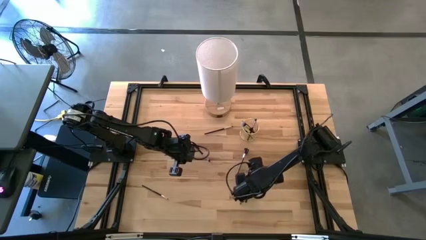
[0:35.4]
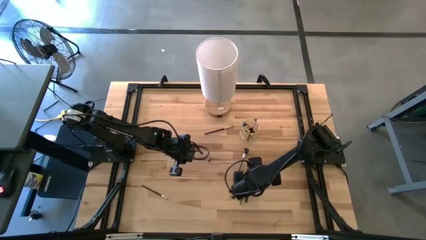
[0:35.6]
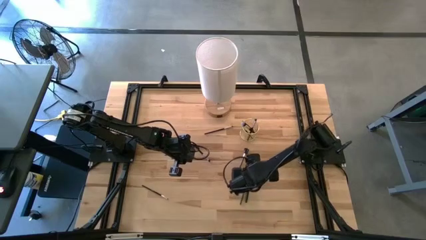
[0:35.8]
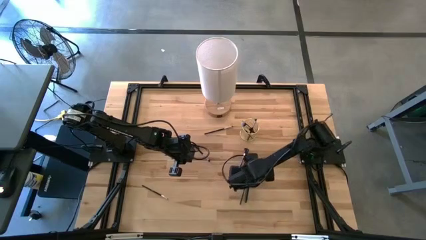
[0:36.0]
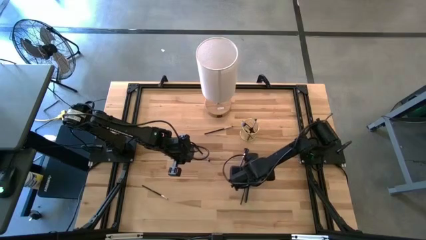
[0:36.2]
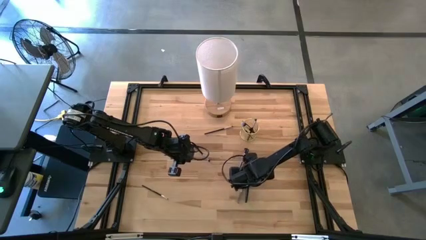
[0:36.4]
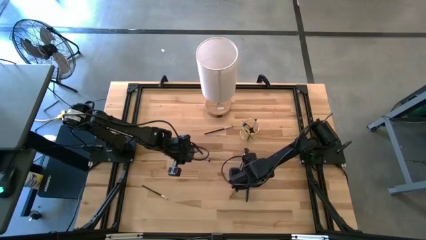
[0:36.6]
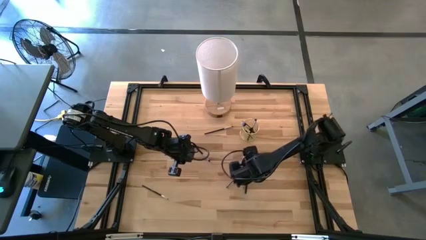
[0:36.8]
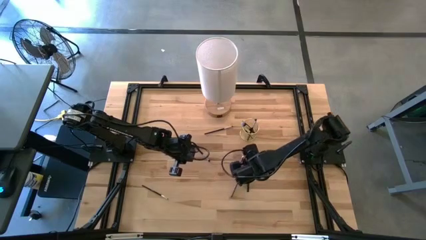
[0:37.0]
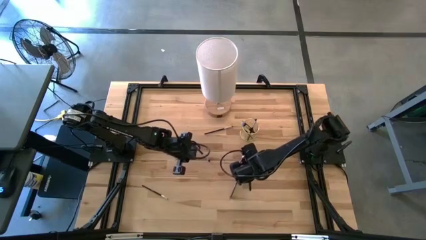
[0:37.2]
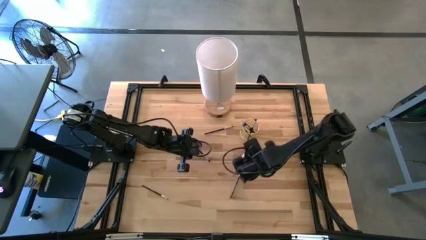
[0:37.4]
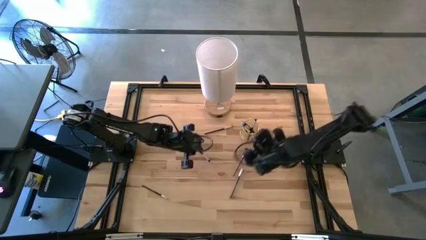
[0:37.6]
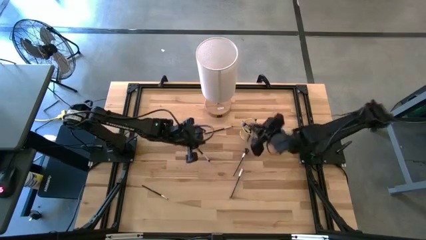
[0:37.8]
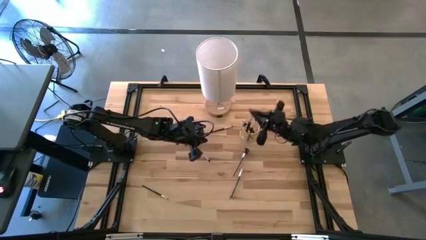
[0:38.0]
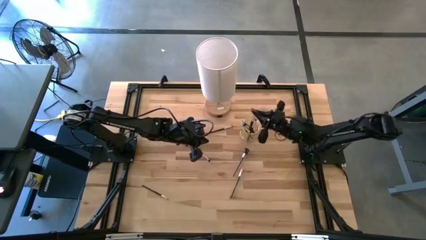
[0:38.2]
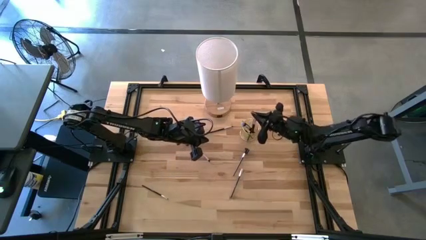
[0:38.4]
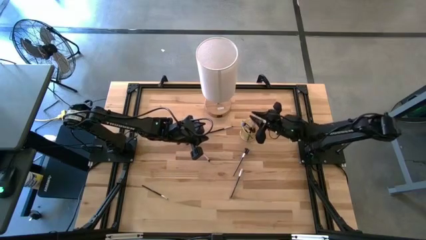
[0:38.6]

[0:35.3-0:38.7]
Task: Pick & Place Makeup Brushes
Put the black powder brush into the makeup brush holder

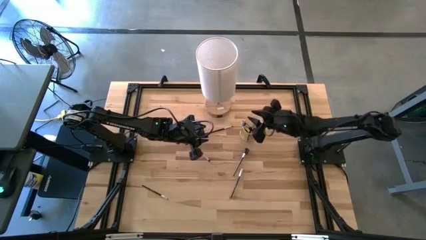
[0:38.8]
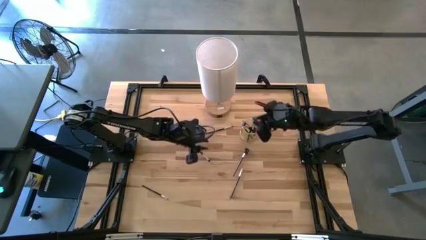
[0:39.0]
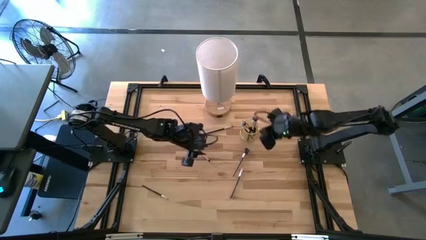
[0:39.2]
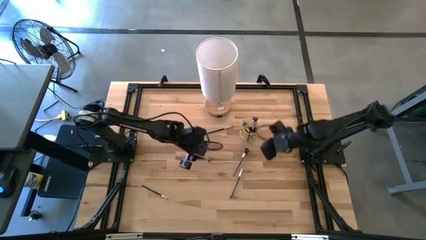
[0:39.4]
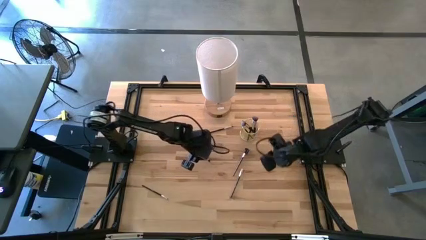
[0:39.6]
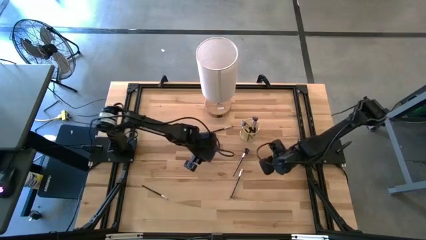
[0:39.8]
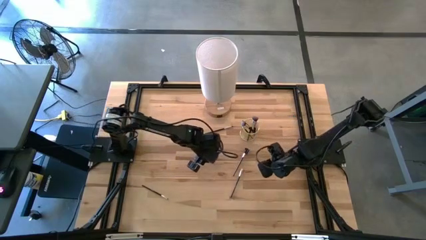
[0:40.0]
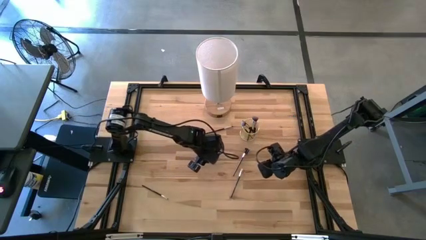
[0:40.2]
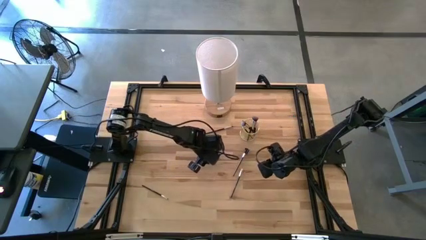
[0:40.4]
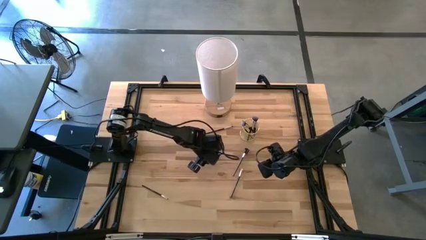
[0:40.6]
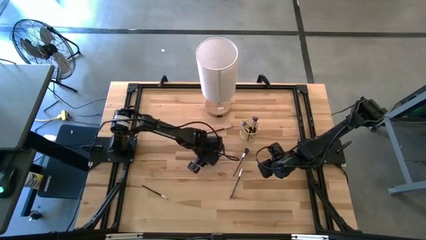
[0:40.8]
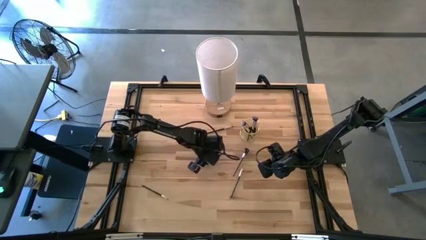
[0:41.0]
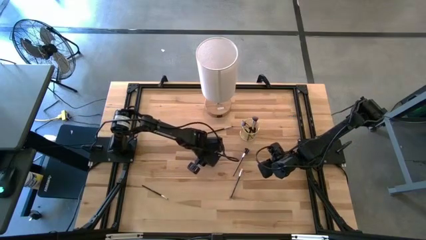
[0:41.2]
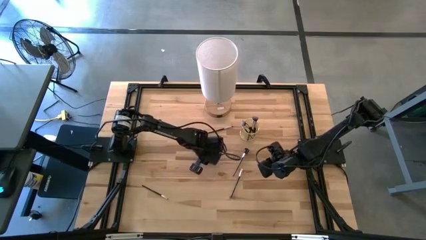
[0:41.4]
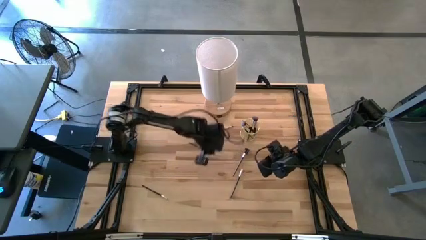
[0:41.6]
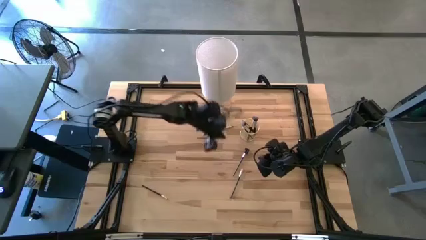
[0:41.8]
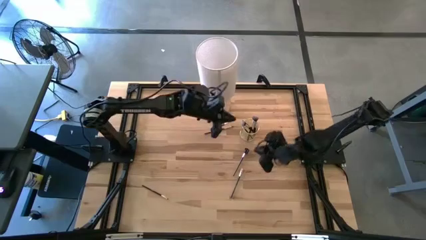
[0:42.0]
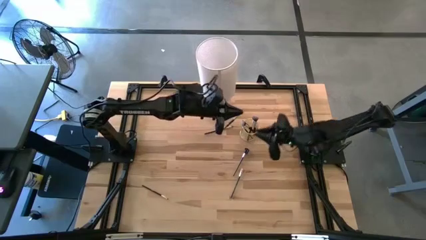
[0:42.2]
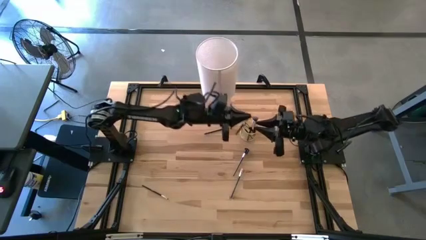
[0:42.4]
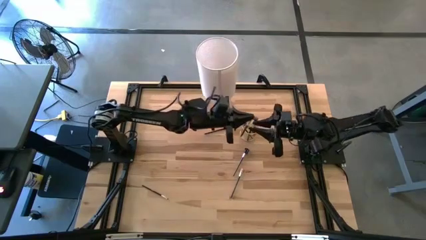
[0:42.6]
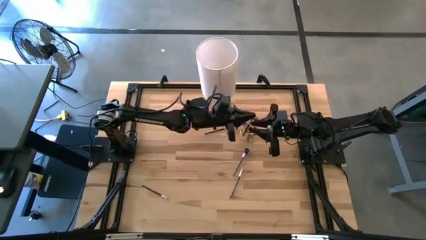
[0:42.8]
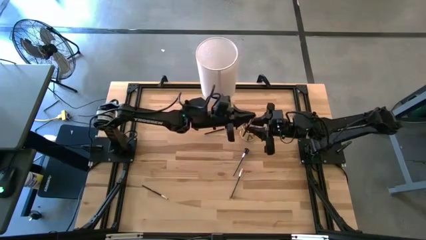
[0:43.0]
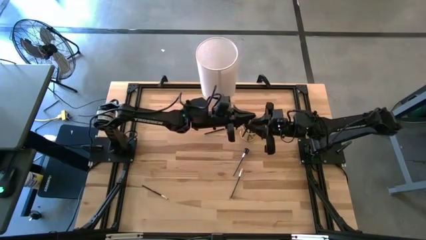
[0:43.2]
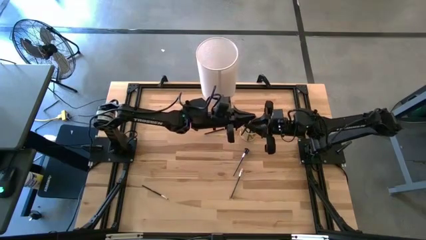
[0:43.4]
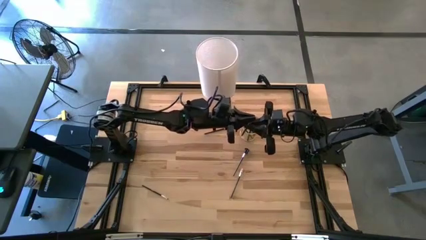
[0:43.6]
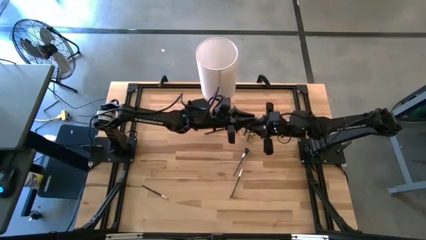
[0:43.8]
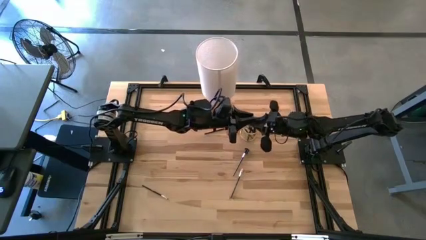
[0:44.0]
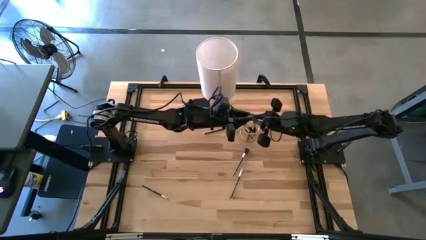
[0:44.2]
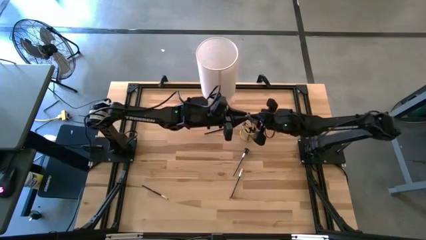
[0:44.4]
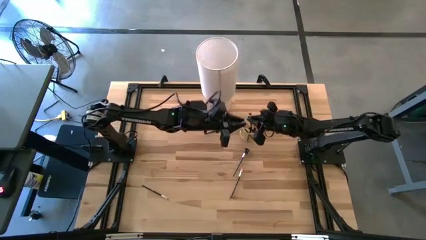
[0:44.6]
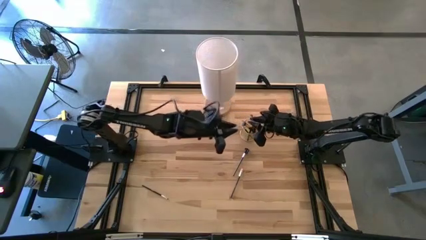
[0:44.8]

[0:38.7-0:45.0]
Put the black foundation brush into the makeup brush holder

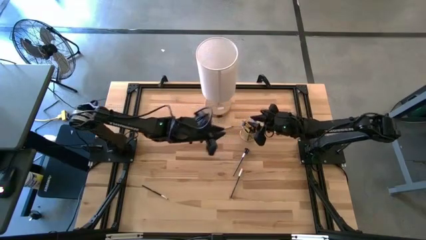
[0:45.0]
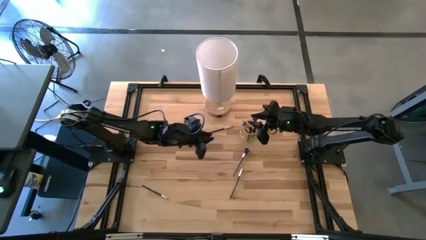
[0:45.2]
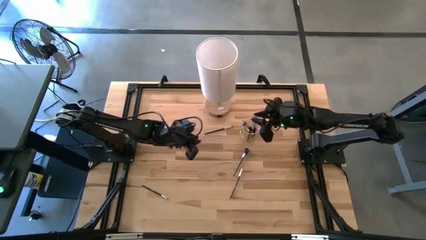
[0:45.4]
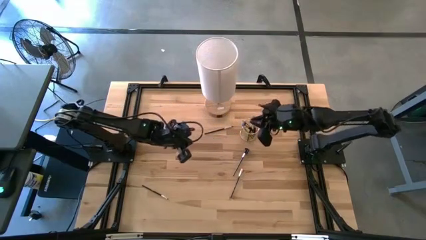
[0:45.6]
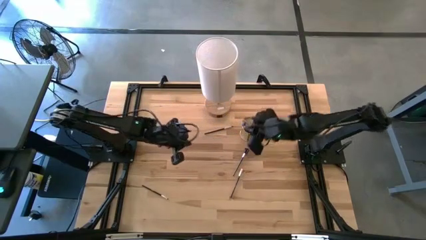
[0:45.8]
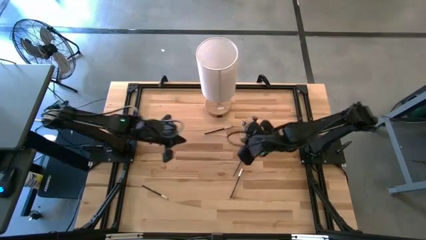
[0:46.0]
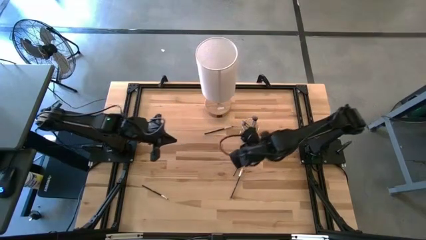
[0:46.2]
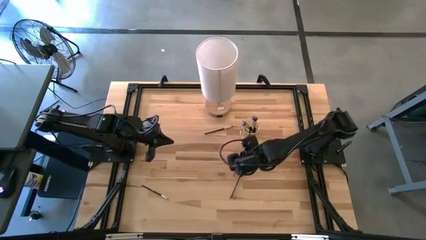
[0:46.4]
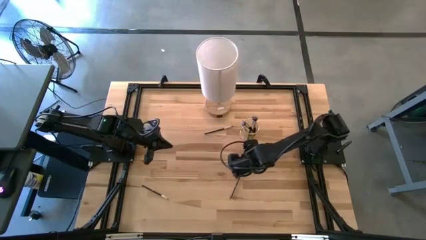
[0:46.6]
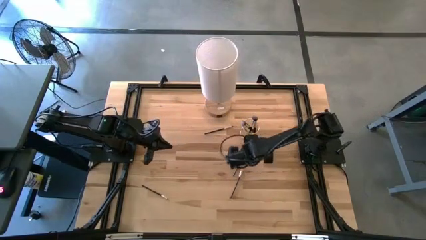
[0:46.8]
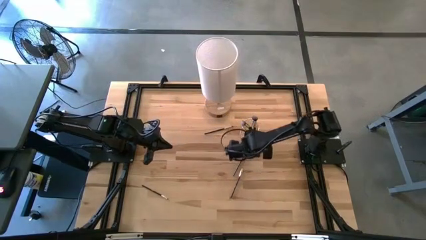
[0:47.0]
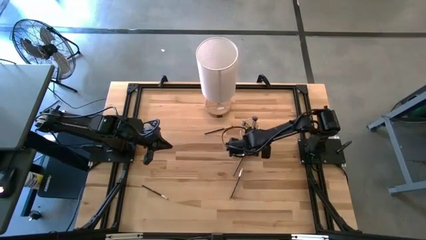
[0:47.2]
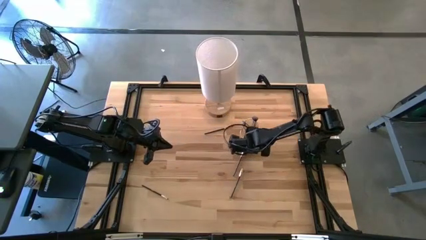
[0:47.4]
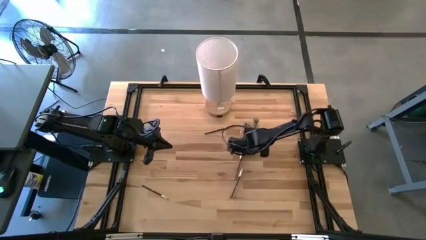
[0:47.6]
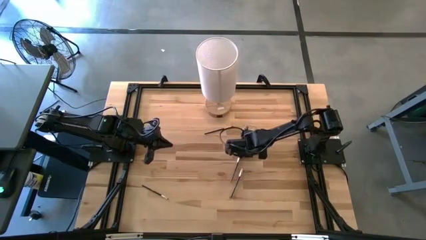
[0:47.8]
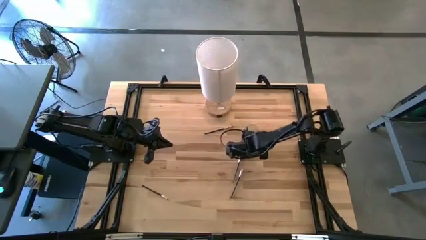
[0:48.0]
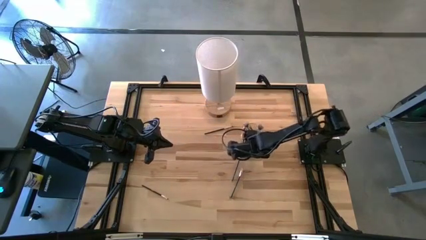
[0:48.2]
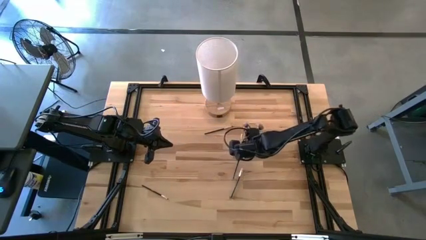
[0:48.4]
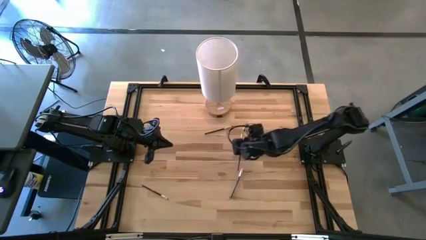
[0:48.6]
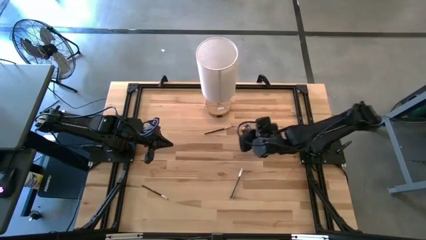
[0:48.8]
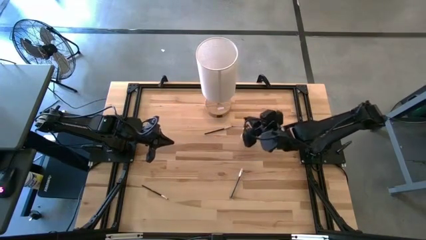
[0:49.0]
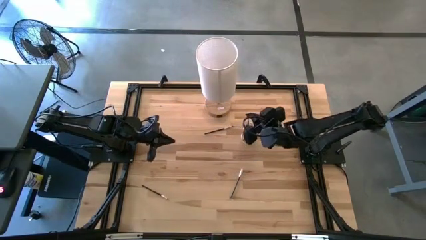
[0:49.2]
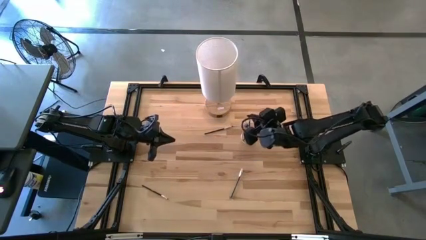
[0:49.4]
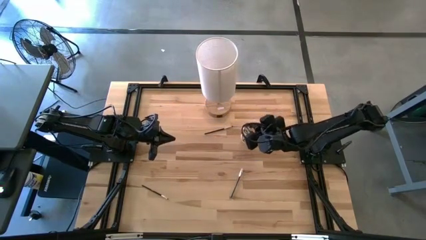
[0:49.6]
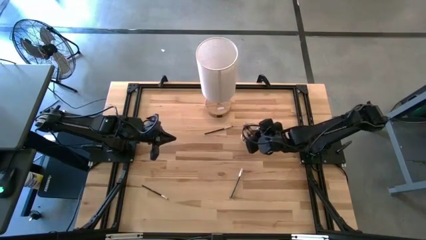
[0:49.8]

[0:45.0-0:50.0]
Put the black eyebrow brush into the makeup brush holder

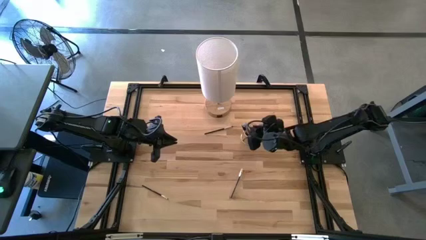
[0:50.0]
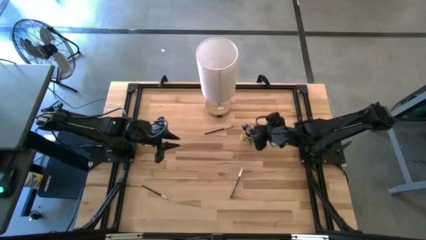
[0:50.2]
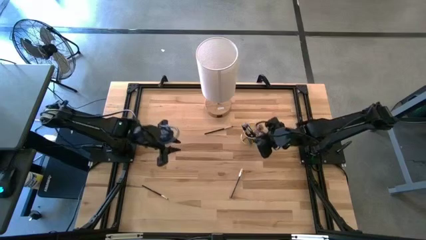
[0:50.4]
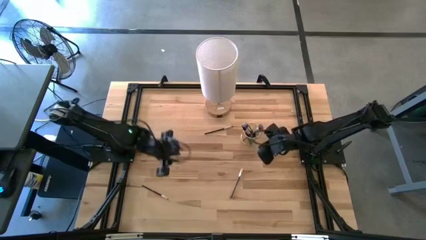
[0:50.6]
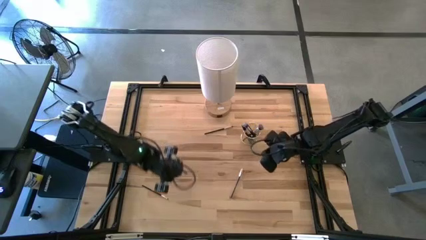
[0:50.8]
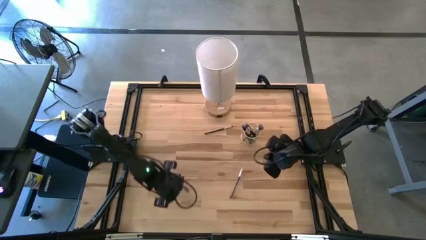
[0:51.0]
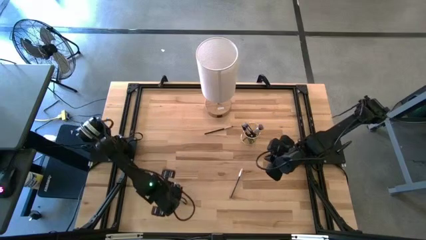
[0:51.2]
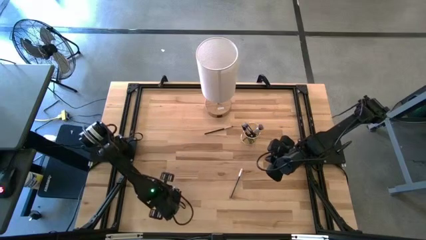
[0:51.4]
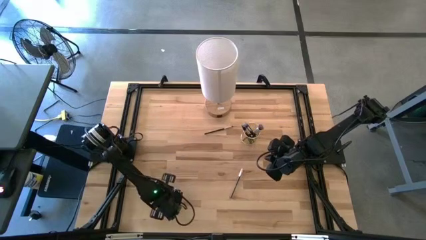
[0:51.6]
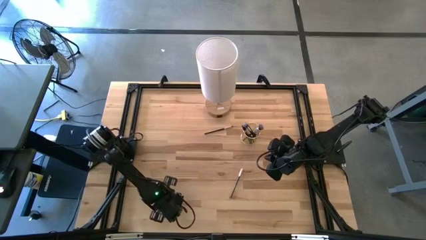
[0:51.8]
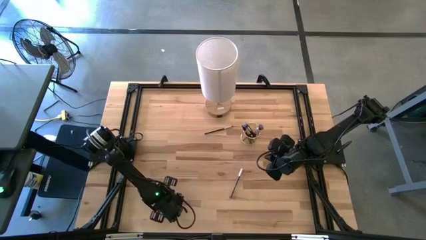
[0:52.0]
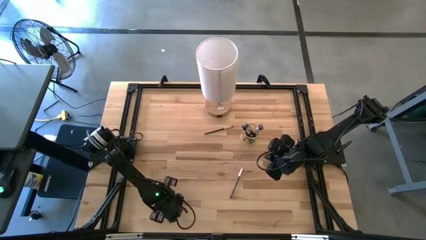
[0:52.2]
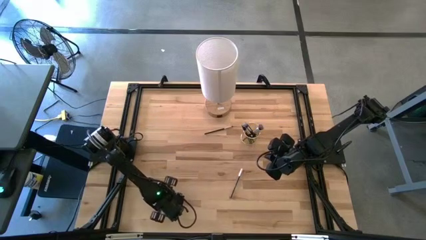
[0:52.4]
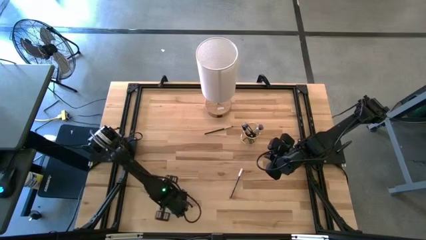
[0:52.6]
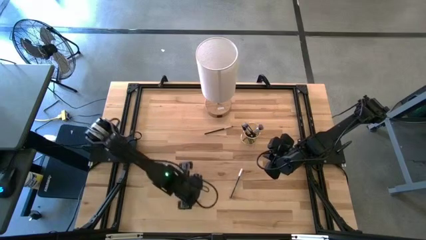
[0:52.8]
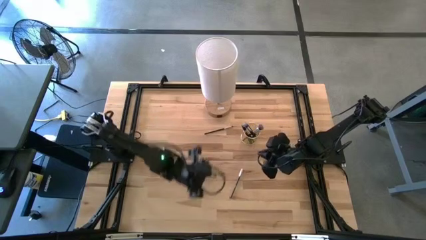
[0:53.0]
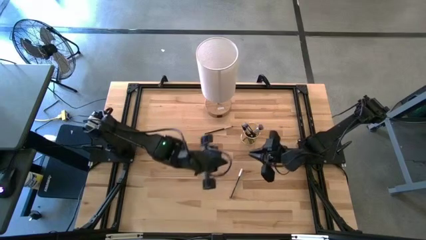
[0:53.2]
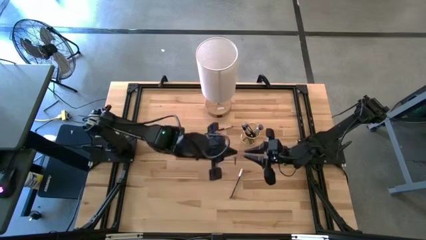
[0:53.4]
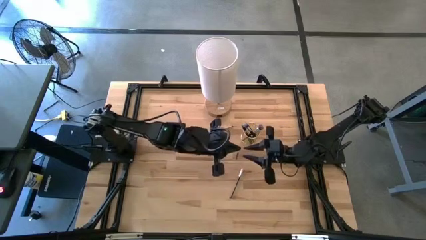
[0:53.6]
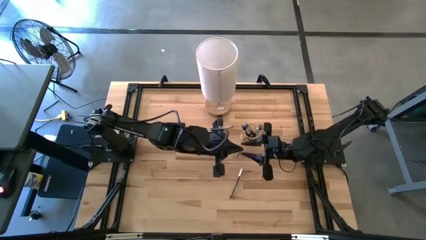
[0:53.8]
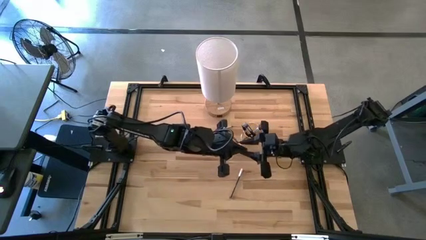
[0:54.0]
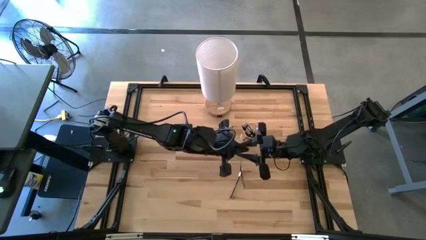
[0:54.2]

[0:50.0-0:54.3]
Put the black eyeshadow brush into the makeup brush holder
